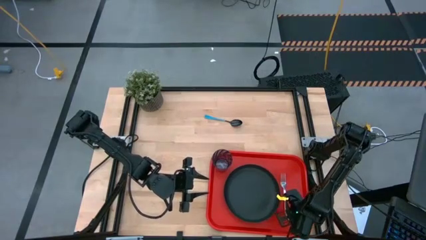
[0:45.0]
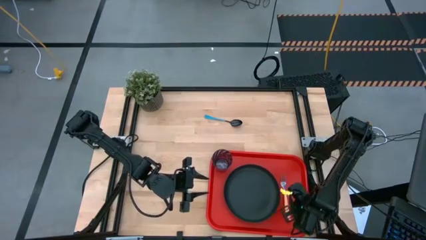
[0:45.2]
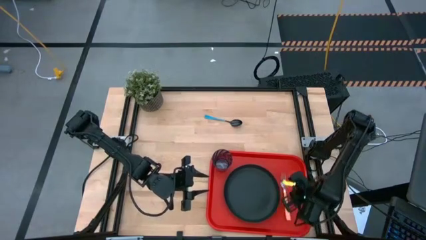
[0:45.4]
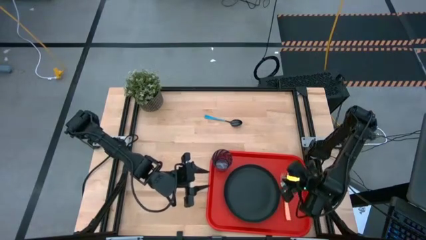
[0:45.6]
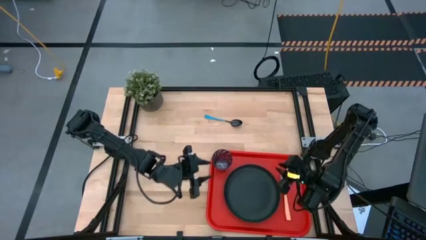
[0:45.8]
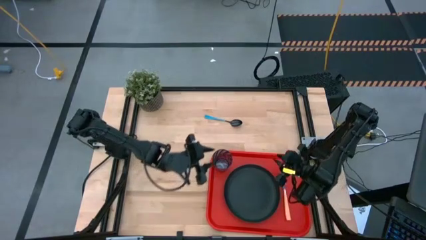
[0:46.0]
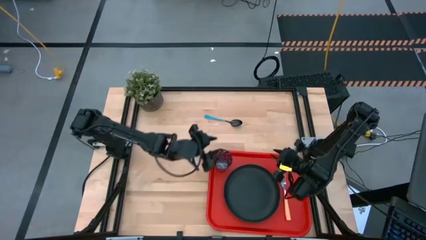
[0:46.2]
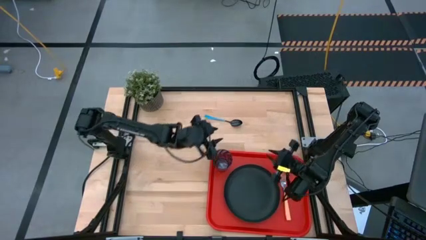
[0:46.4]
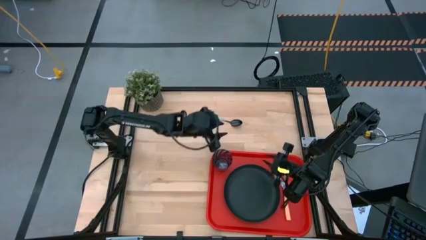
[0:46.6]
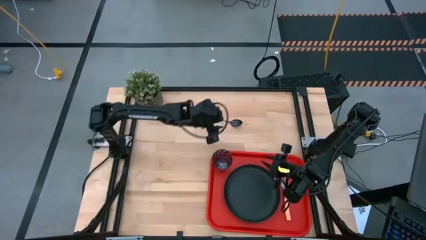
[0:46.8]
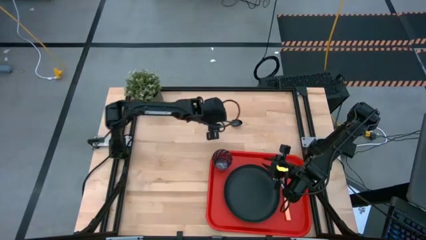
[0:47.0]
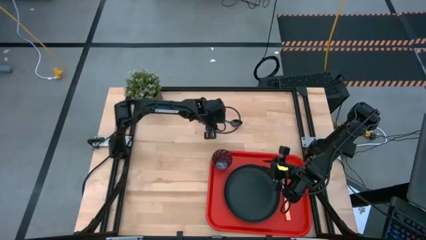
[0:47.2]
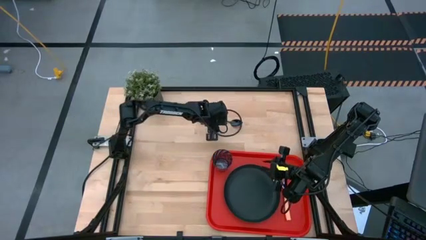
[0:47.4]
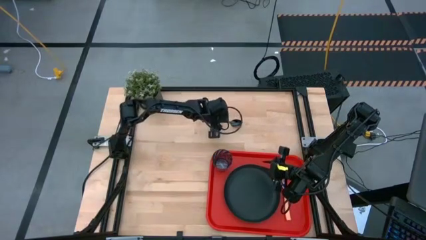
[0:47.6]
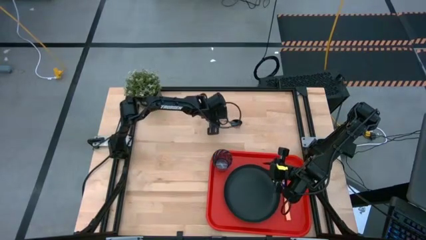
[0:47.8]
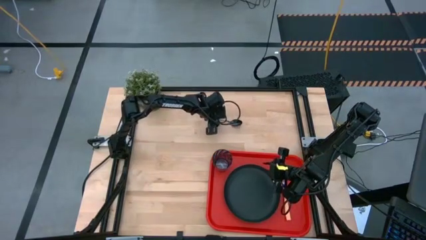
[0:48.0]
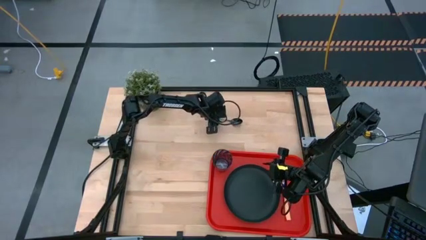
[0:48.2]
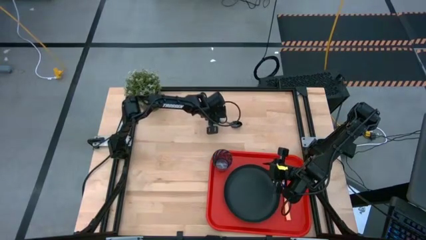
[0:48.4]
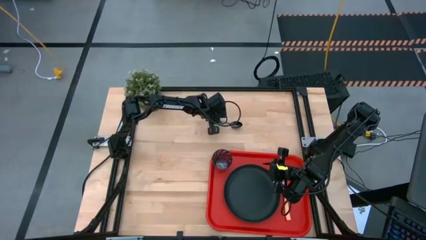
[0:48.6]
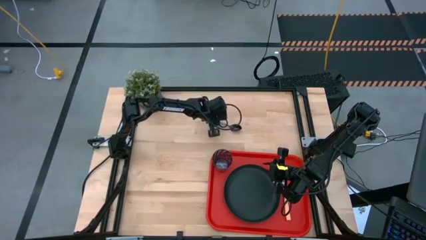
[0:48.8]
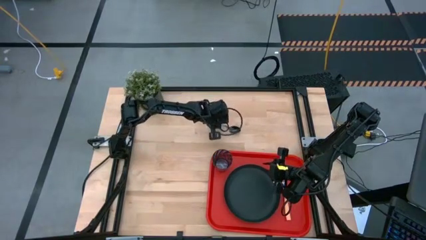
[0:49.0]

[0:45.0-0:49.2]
Task: Pick and place plate/cup/fork/spoon on tray
Put the blue spoon on the tray to the right of the orange fork

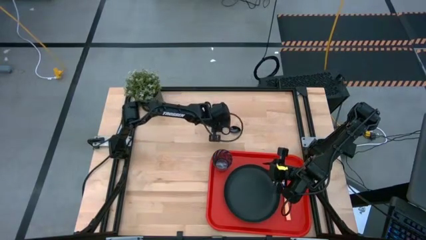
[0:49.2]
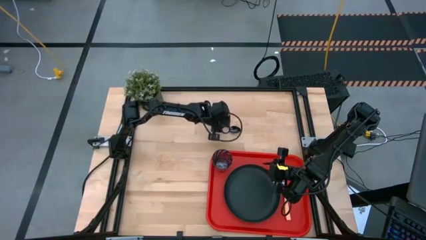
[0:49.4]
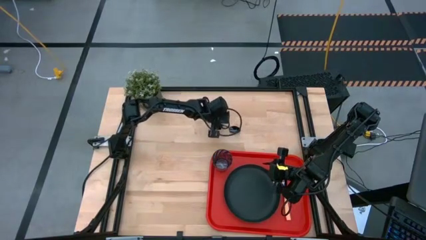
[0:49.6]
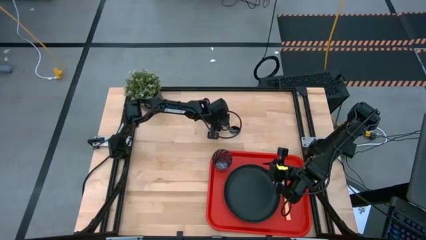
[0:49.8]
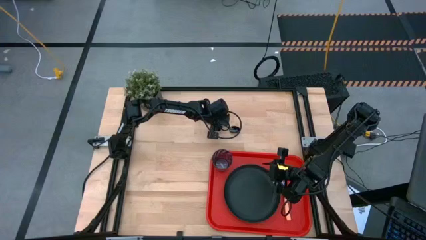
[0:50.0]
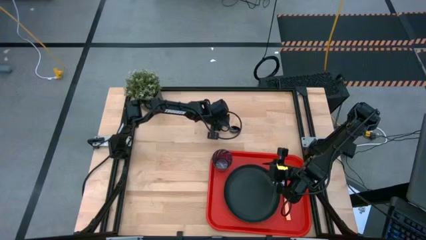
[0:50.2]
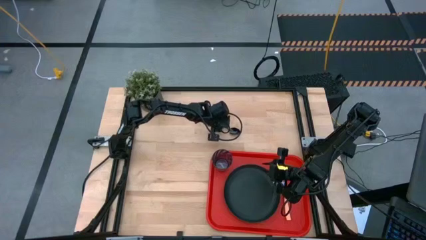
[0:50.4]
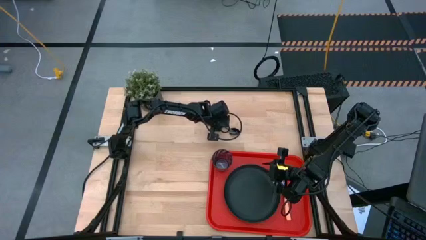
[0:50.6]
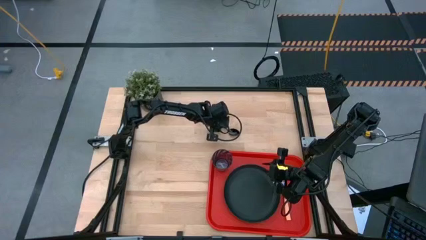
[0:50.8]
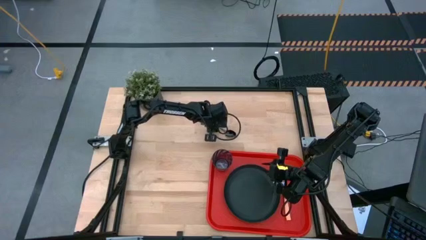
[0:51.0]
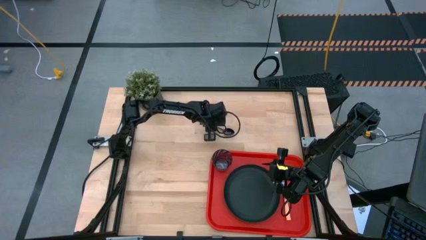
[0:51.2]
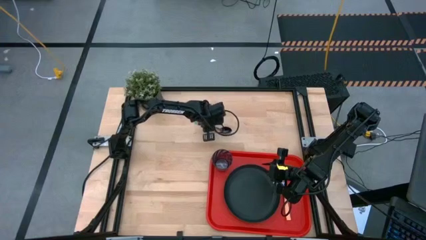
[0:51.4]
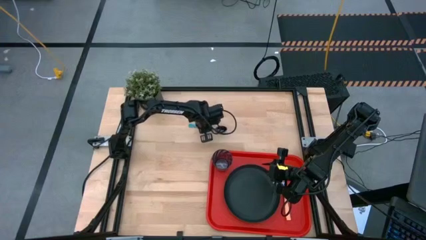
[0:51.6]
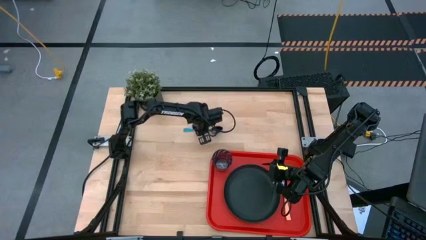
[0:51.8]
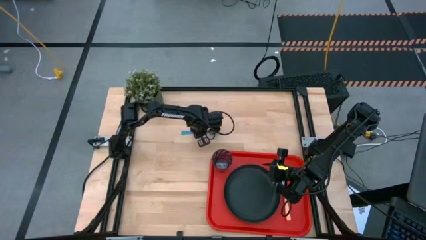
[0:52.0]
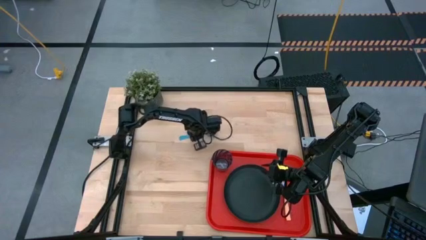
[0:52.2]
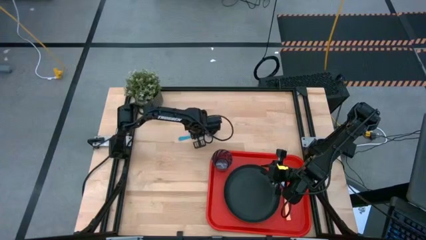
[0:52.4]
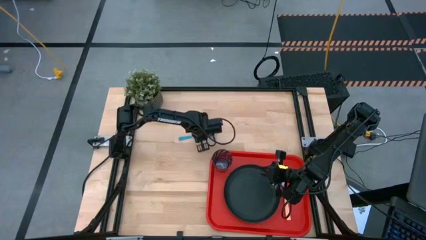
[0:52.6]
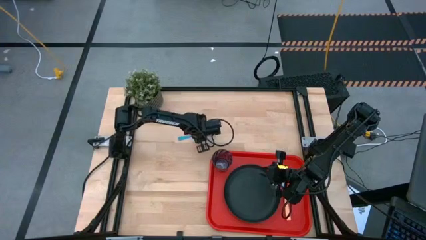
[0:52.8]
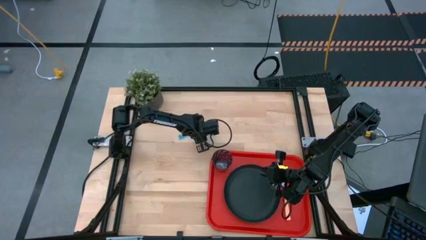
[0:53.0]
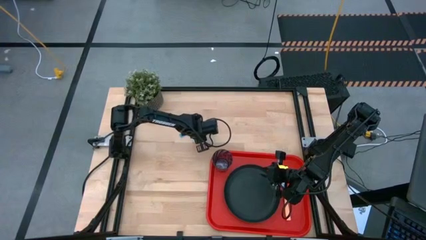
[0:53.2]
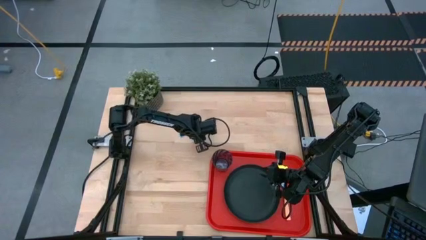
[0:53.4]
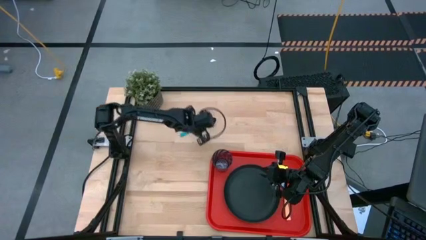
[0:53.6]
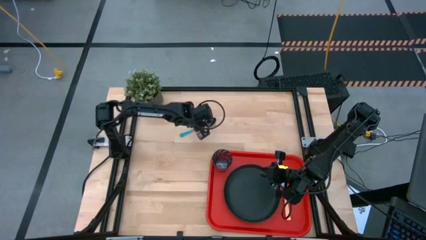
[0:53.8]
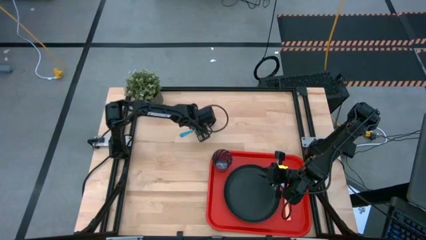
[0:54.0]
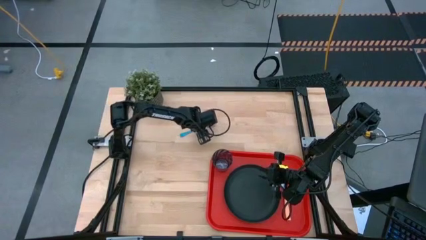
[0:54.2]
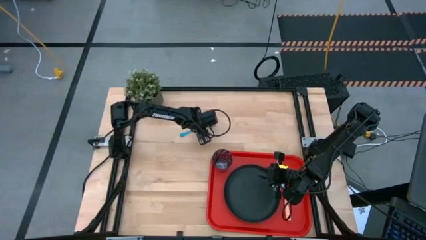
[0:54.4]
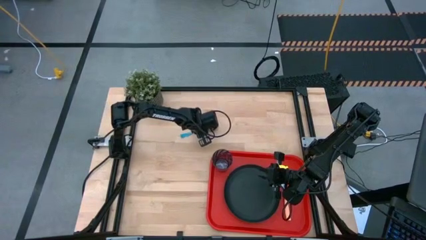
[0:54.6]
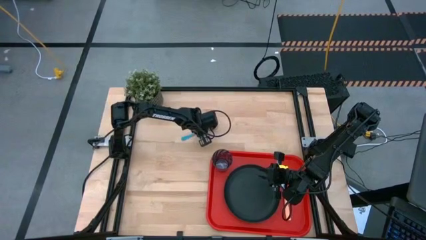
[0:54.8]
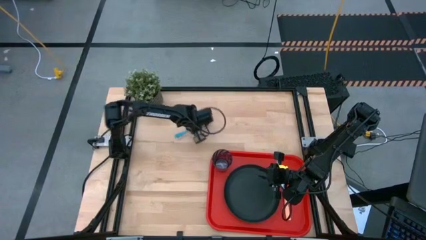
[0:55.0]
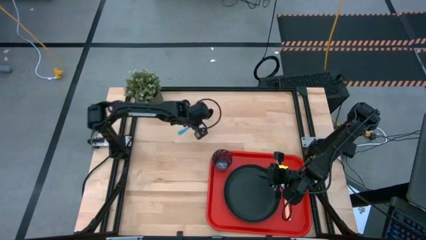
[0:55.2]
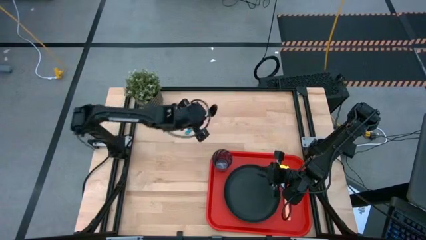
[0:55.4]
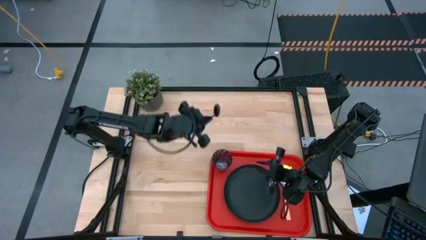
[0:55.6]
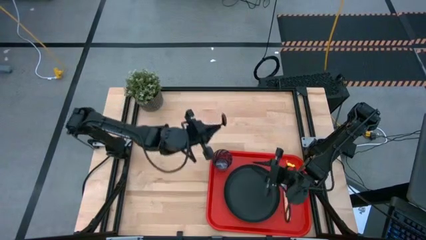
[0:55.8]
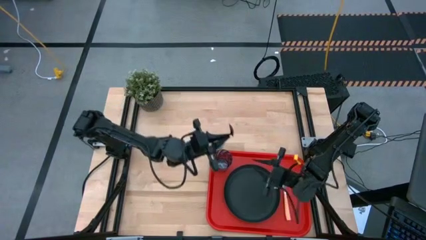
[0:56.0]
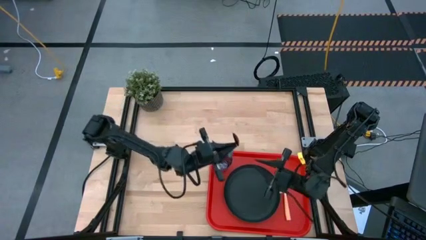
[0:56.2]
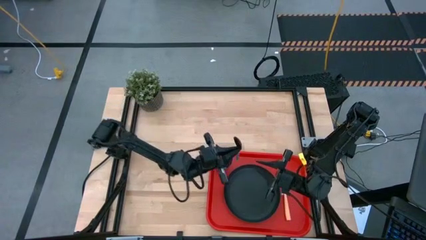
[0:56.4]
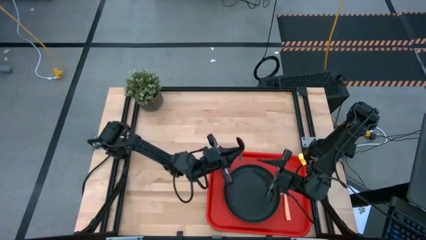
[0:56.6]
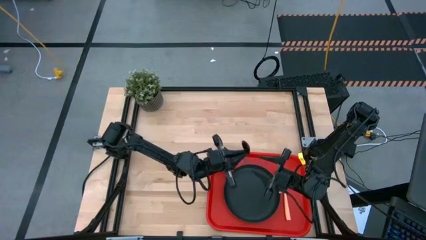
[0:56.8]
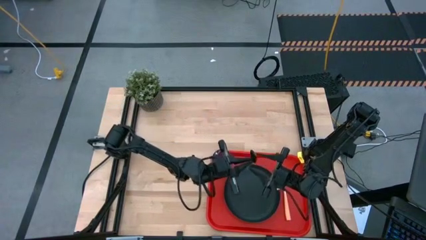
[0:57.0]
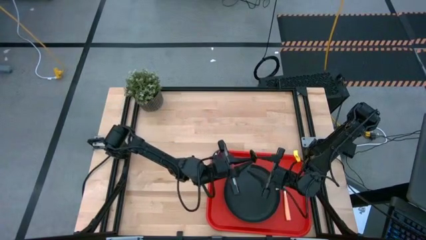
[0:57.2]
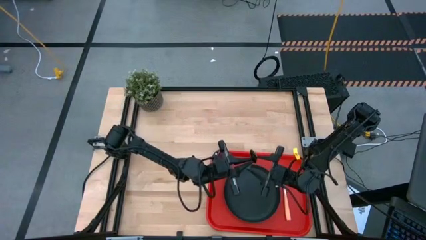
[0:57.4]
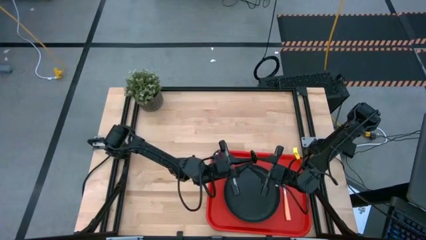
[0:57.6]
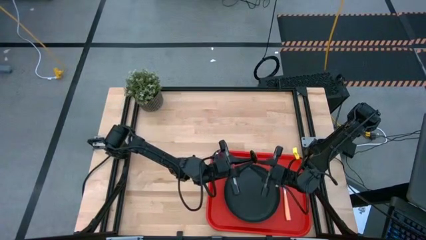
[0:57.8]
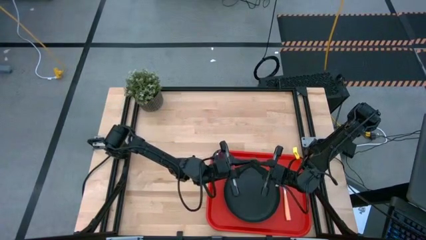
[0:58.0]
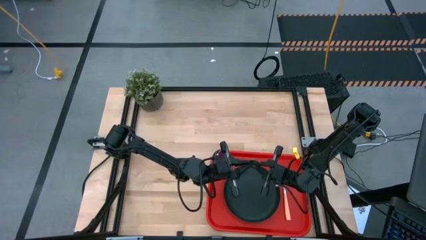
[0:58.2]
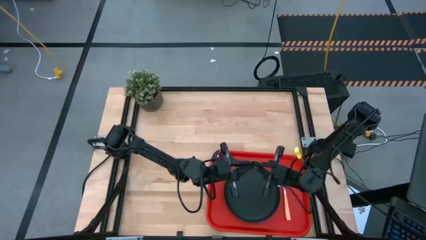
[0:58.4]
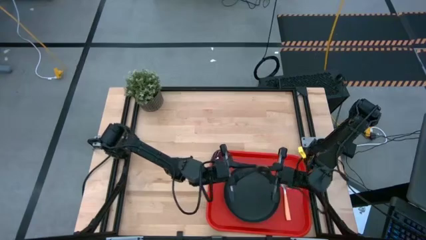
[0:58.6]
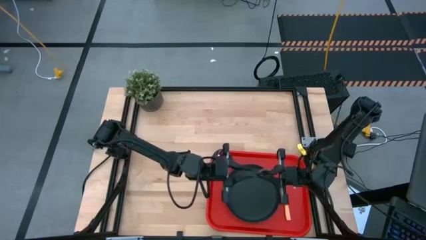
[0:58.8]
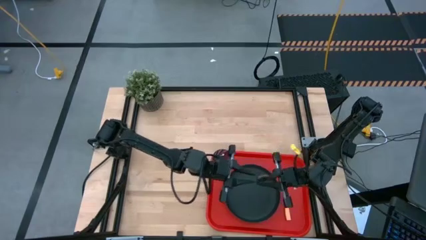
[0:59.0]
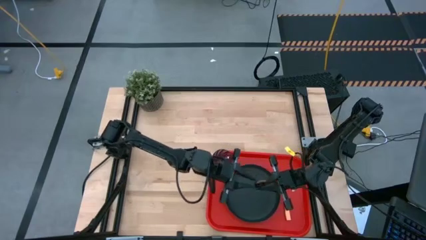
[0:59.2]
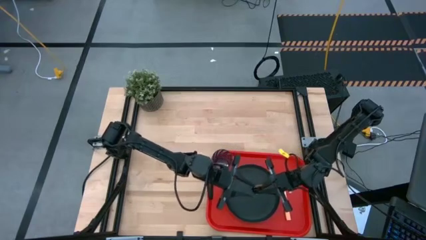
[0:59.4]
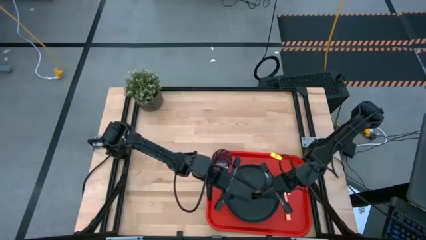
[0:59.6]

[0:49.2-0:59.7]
Put the blue spoon on the tray to the right of the orange fork

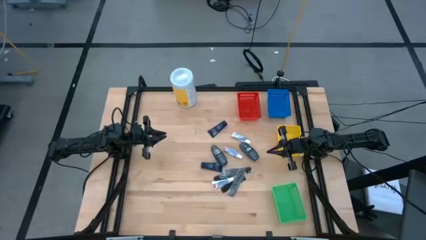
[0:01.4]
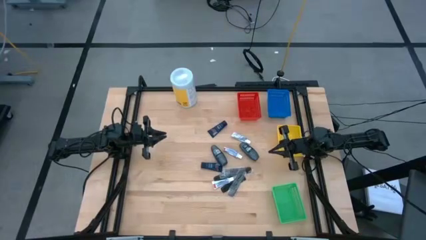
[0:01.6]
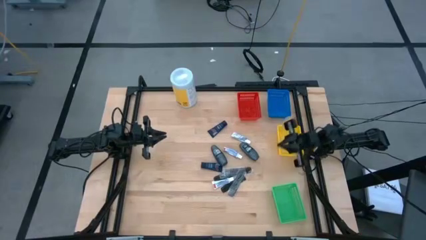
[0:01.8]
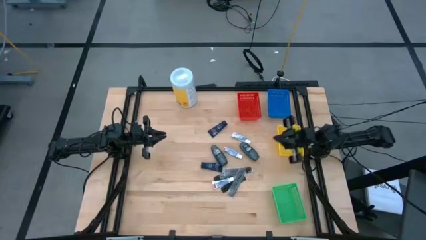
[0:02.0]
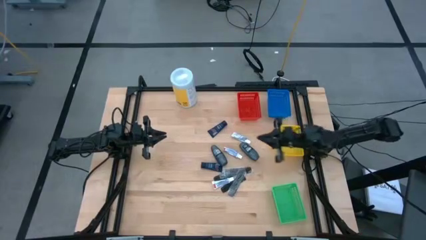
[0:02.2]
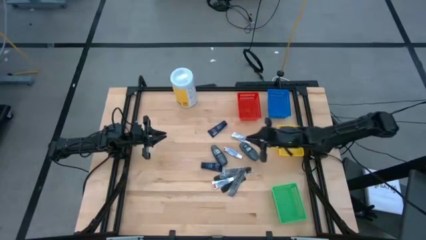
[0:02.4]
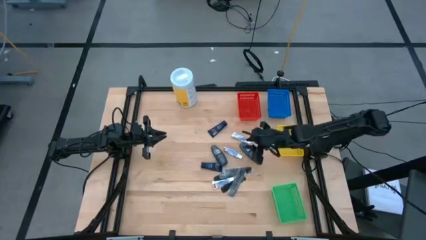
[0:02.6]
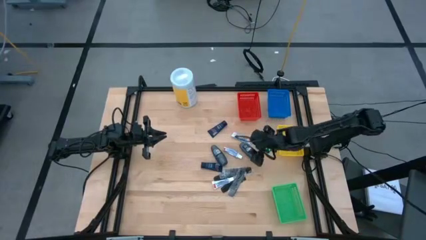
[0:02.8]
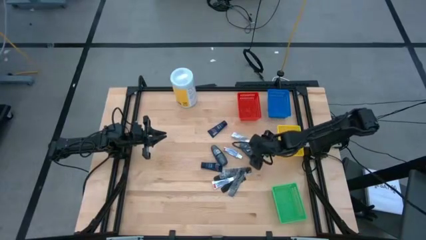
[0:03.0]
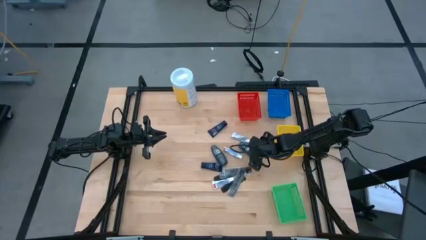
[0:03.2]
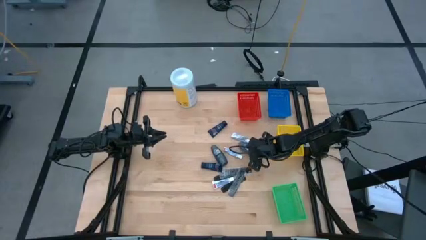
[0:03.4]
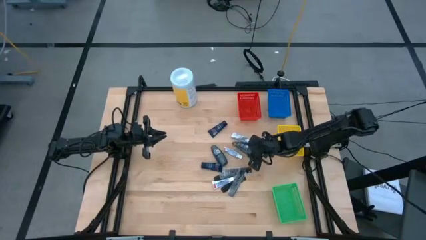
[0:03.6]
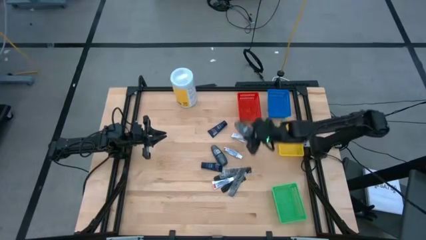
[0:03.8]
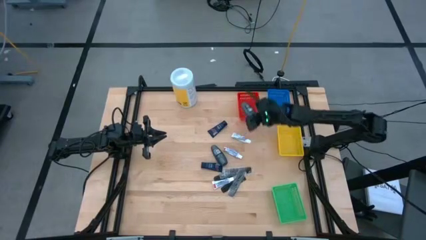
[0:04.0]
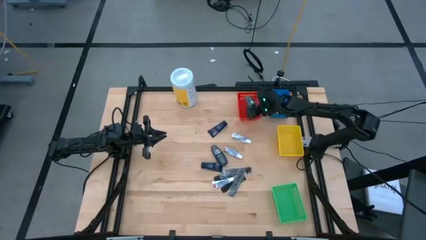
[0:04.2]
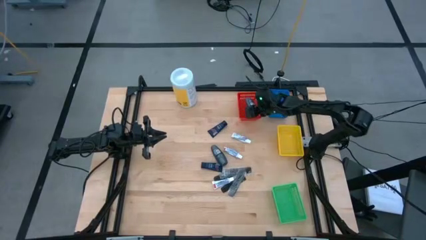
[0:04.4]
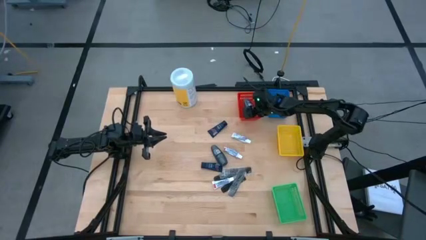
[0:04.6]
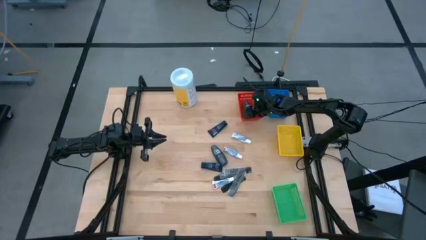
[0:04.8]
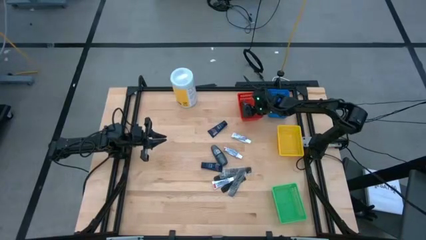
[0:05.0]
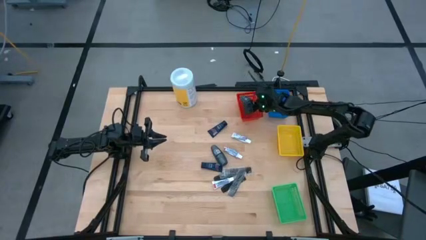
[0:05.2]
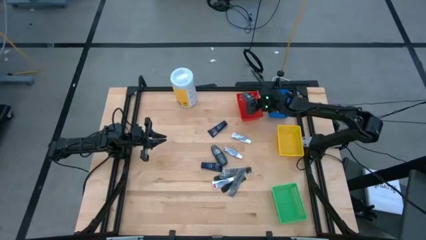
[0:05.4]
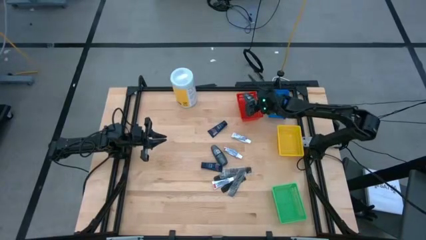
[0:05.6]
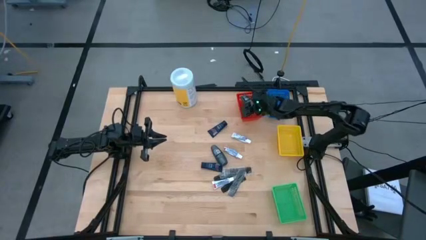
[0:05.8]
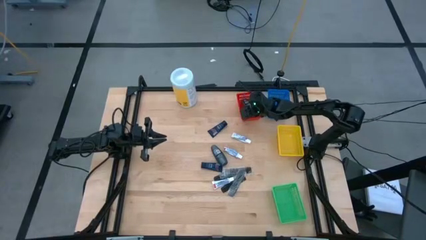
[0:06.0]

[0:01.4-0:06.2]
Task: Pick & Place Travel size toiletries
Put the gray deodorant into the red bin
